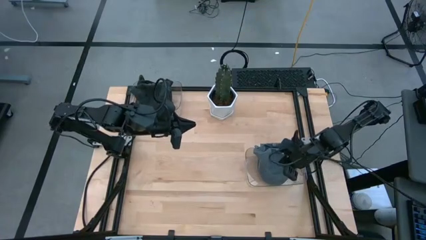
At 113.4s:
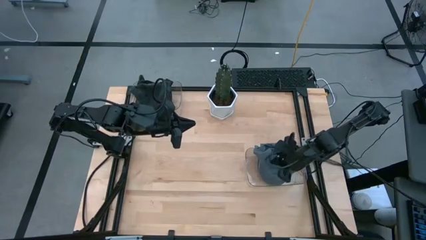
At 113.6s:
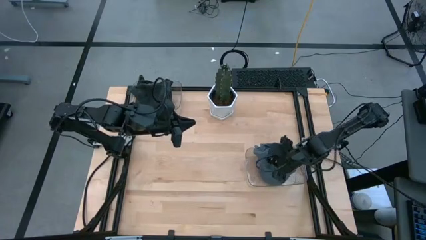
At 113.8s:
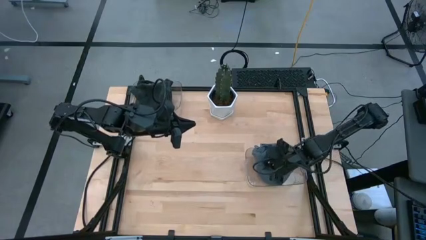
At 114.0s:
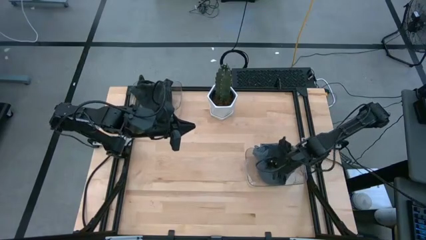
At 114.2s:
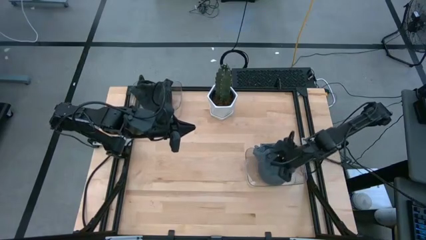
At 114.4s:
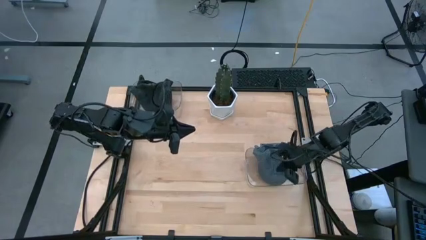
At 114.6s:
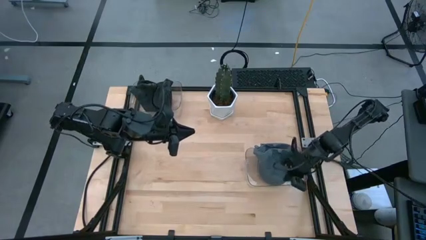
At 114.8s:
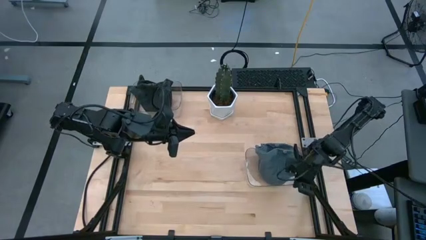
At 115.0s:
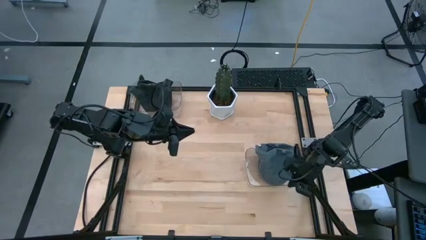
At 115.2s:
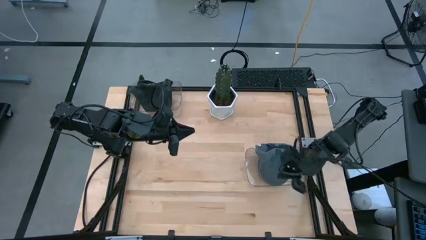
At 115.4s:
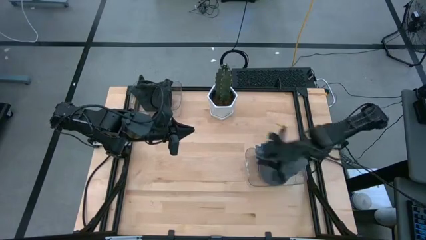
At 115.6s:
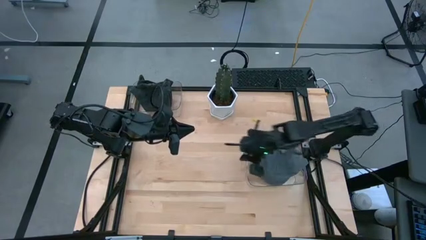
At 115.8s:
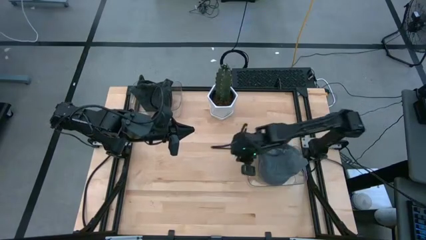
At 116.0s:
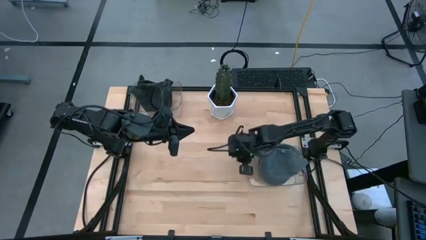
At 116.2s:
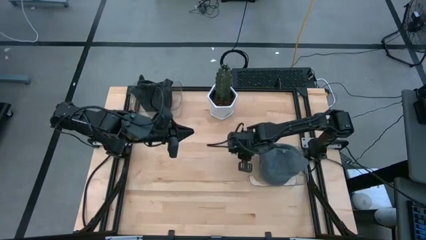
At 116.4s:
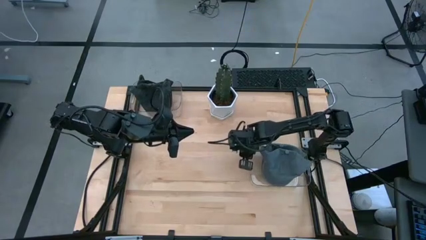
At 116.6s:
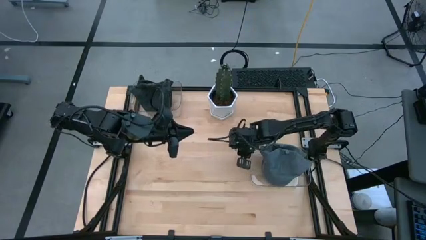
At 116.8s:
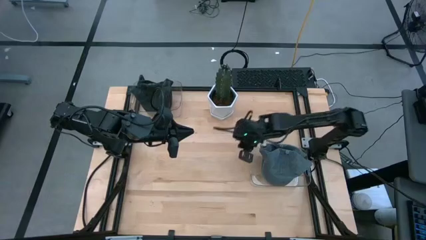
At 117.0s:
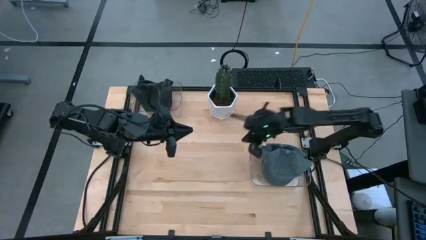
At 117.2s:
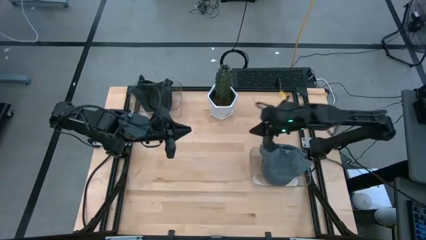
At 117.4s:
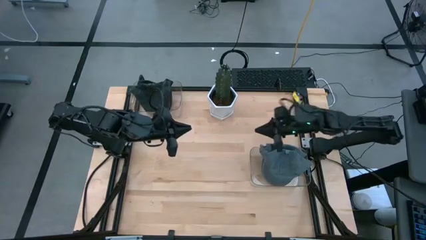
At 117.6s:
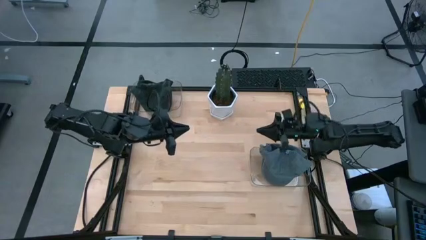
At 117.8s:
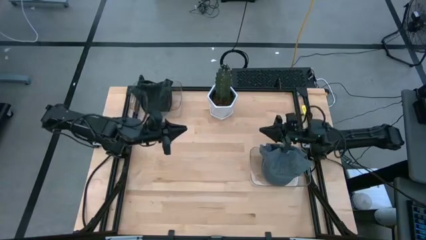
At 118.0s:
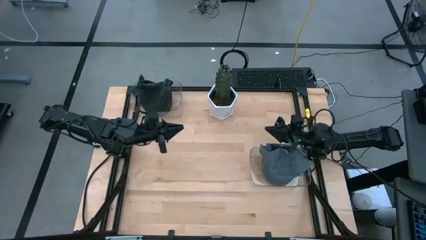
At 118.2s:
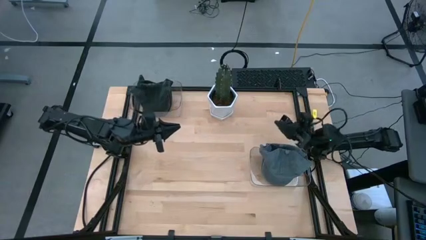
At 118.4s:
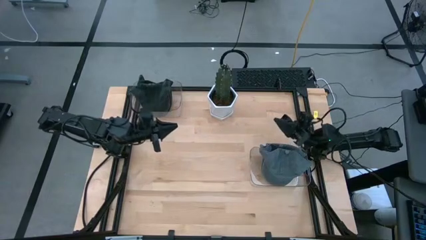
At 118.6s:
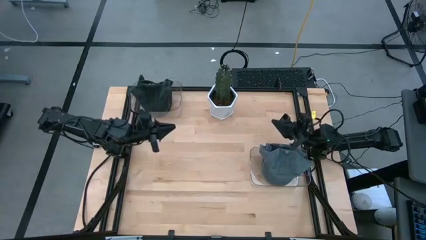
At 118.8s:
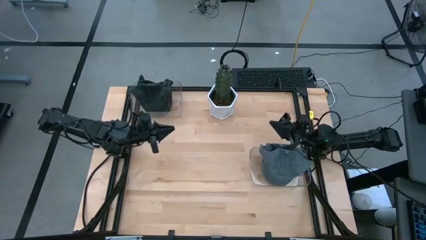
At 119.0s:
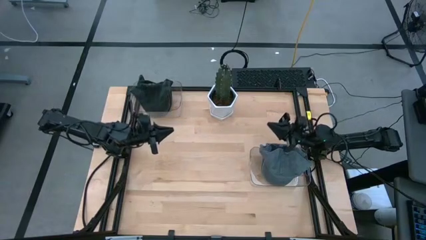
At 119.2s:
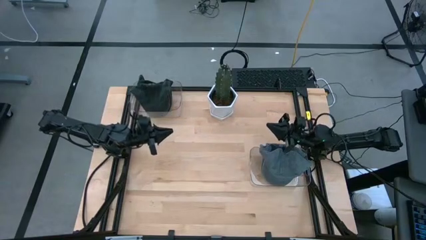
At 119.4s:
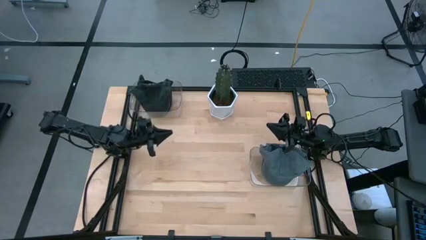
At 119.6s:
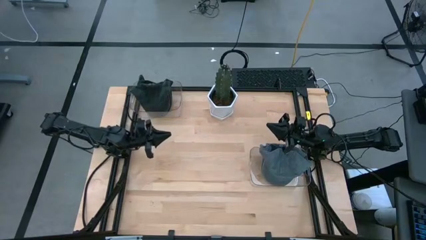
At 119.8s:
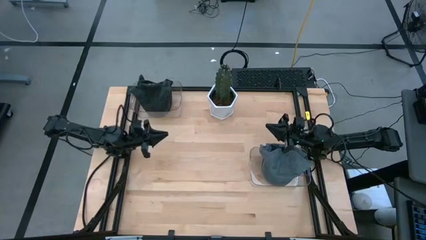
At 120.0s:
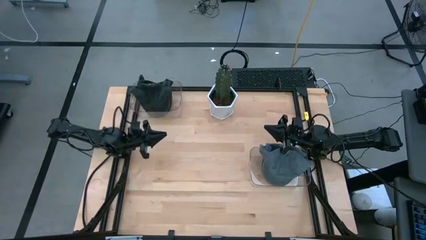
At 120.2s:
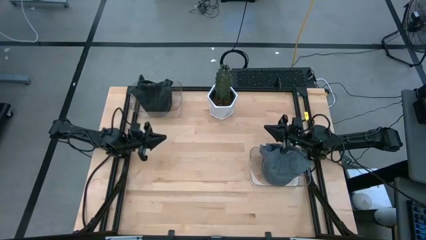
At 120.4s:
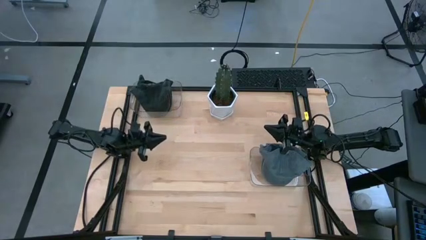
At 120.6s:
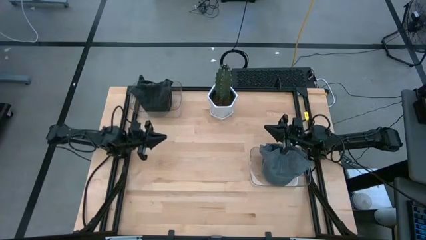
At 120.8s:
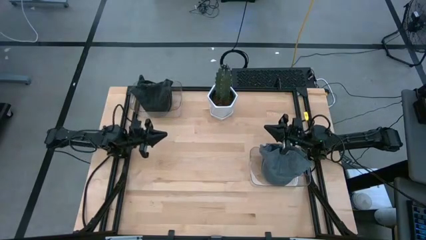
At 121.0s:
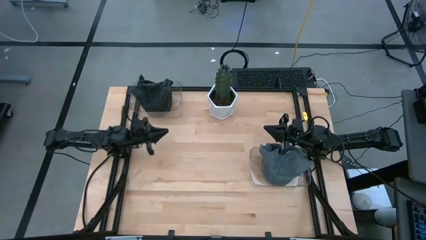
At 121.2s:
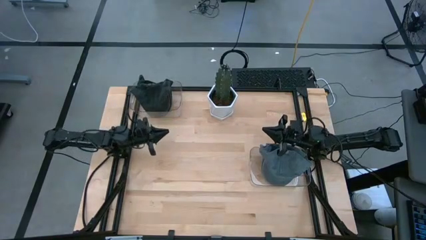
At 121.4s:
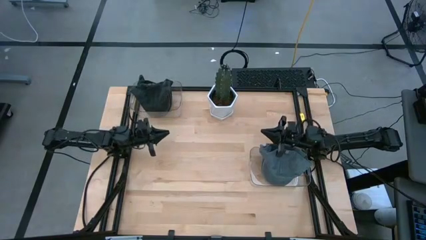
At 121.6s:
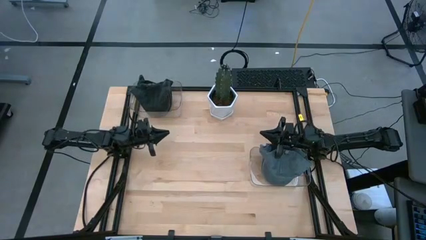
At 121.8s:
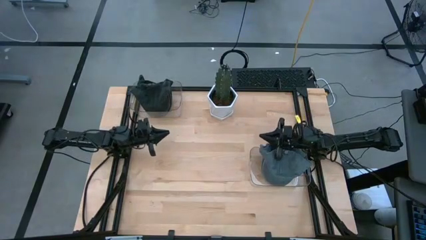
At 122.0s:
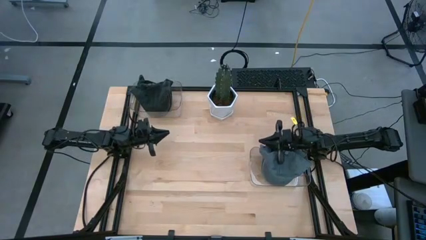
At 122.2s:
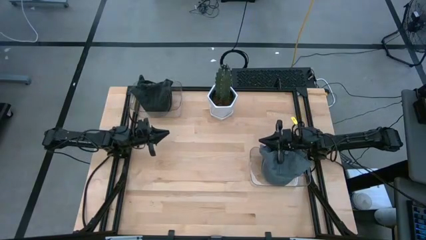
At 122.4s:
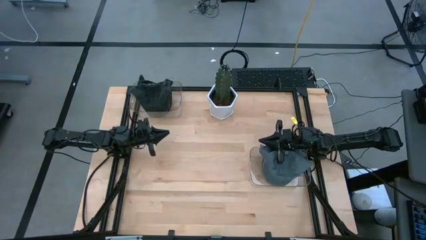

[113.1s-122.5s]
Task: Pick & Place hat
Return to Home Position

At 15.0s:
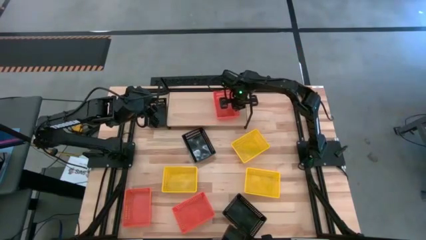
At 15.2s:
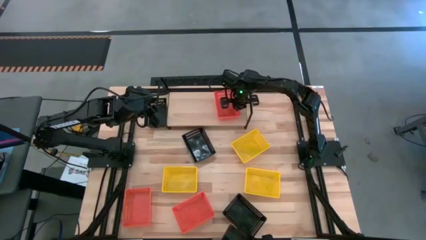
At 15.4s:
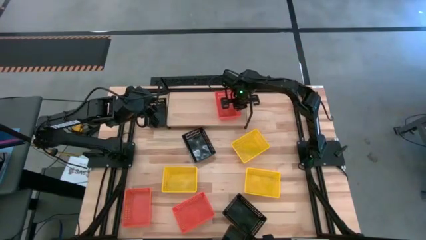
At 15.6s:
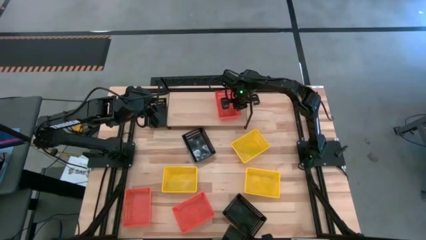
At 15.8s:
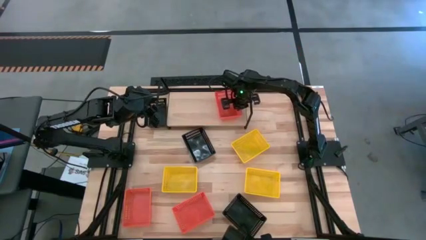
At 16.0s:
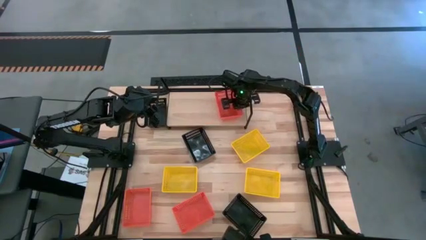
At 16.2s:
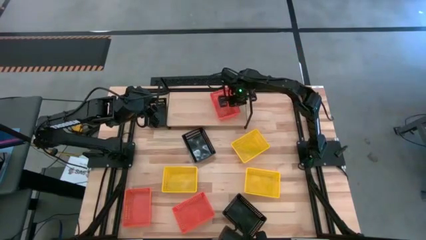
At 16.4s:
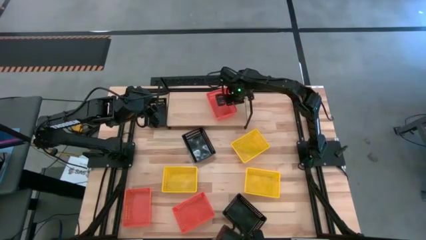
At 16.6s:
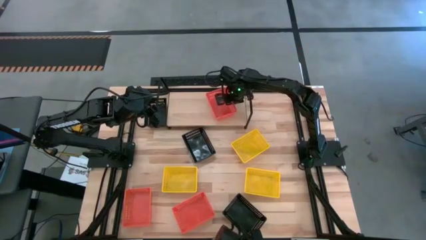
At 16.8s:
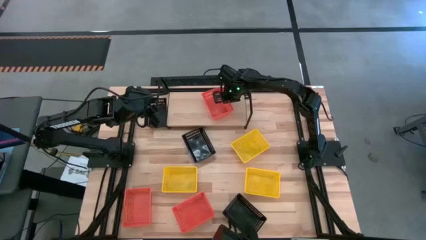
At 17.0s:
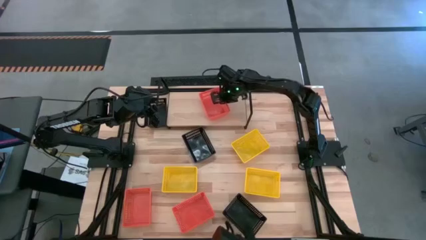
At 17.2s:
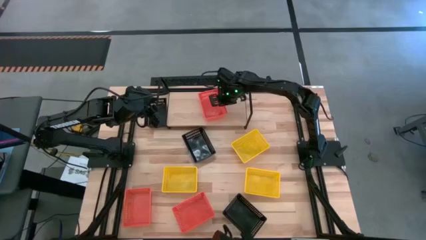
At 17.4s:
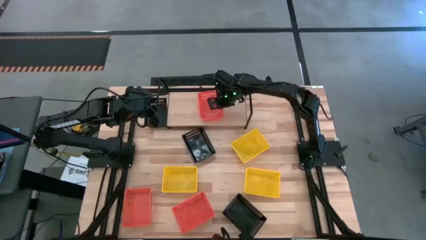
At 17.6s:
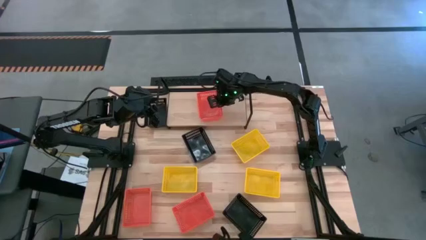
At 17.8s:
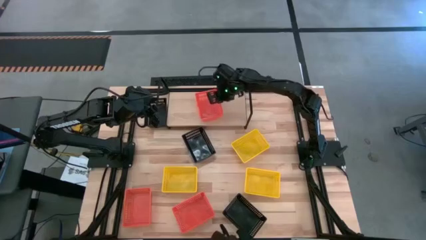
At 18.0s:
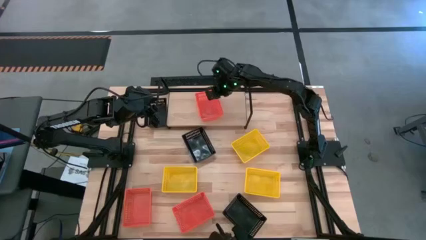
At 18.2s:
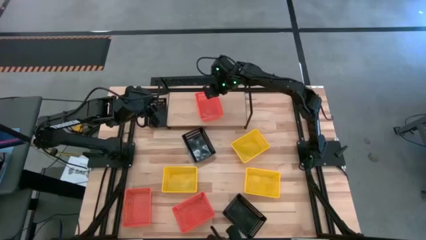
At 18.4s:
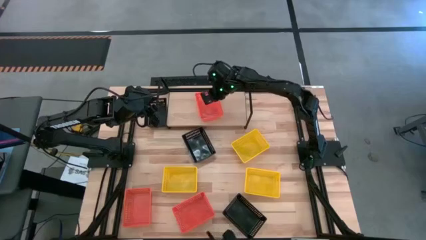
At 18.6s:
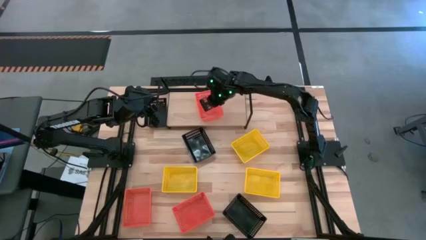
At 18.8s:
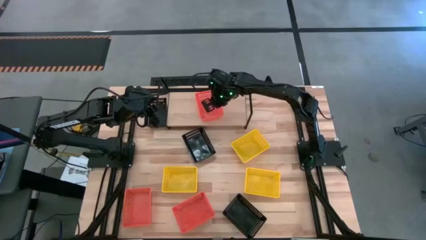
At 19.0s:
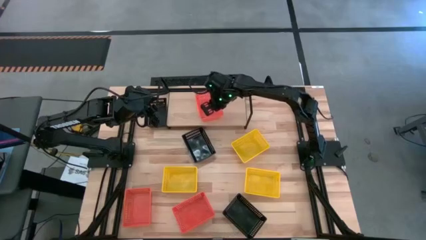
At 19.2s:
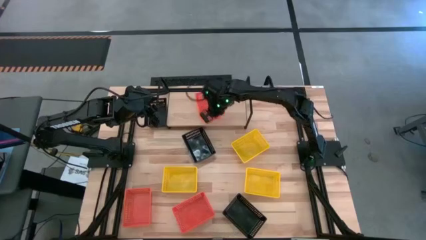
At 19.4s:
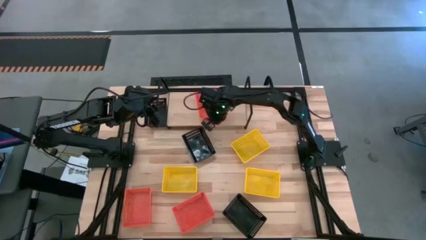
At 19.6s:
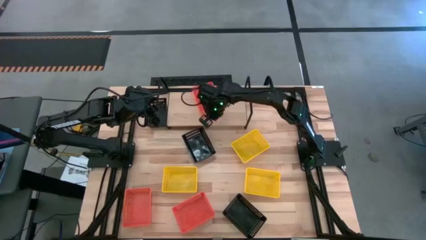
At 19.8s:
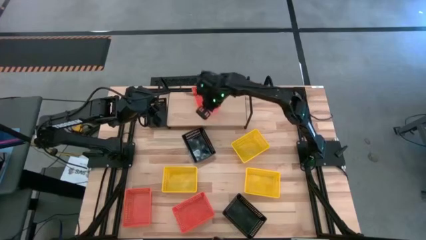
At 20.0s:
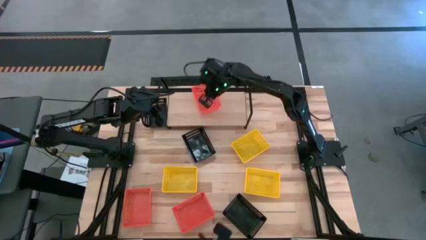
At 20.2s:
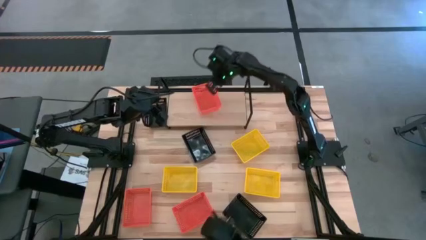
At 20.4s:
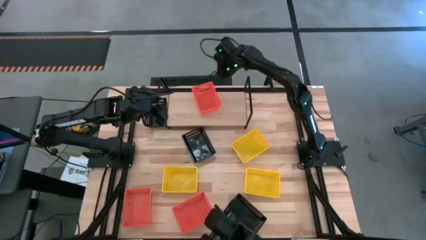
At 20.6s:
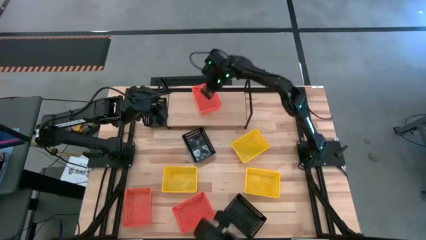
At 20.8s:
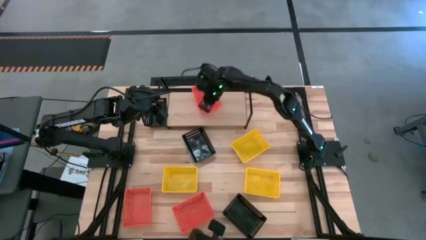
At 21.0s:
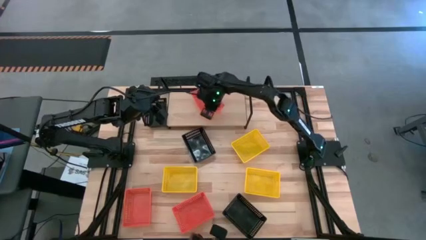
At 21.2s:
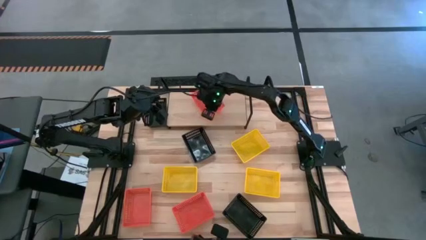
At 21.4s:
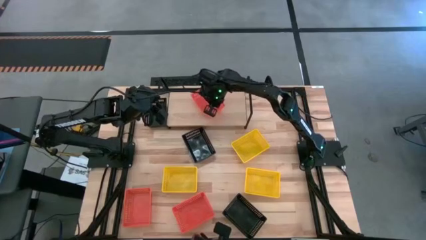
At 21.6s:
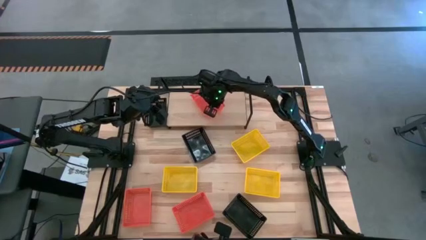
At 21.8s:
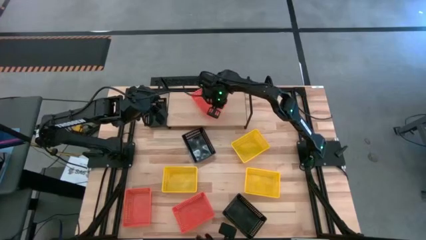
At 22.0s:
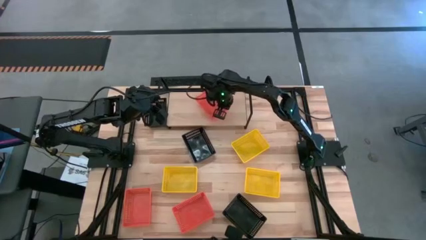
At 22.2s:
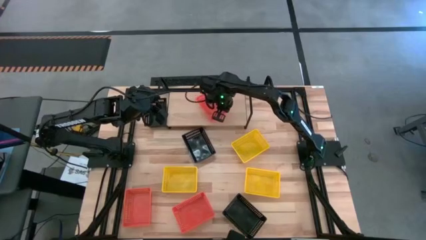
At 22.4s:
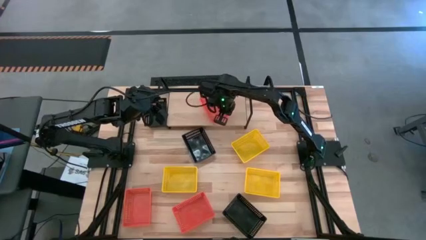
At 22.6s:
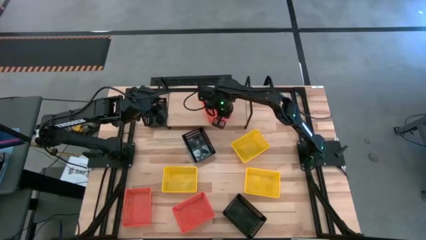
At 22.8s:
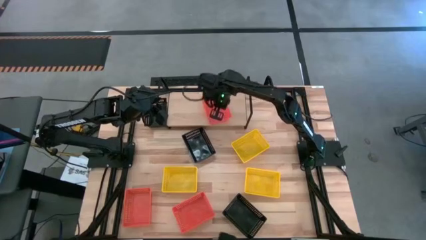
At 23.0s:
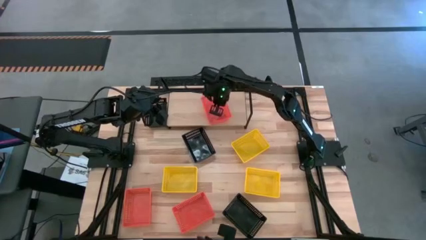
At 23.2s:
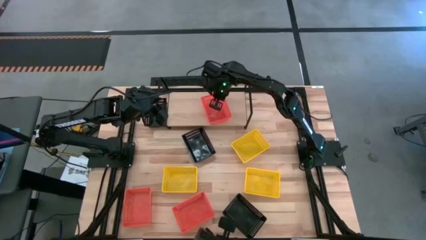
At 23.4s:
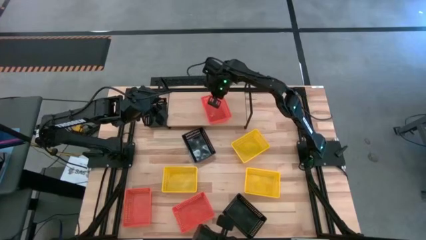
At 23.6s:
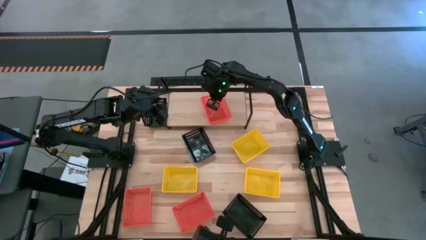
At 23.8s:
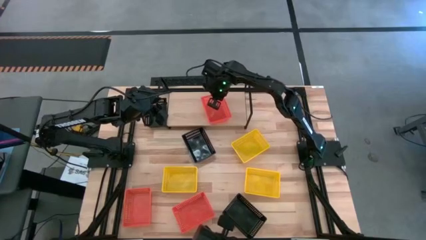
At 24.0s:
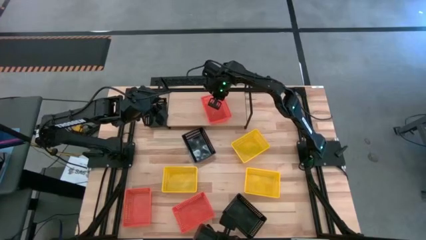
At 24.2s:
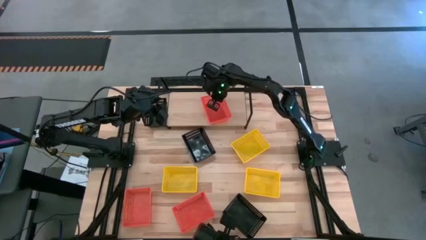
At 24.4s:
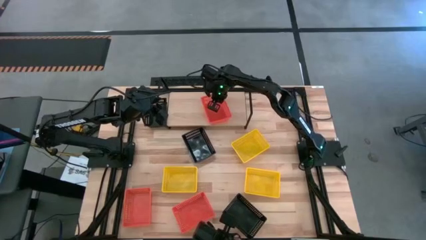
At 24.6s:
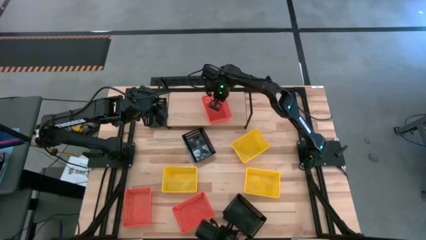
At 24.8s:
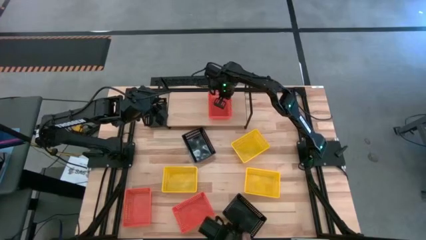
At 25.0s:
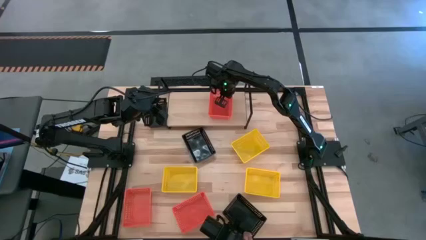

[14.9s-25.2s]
Task: Stack baskets on shelf by color
Put the top orange bin on the shelf
